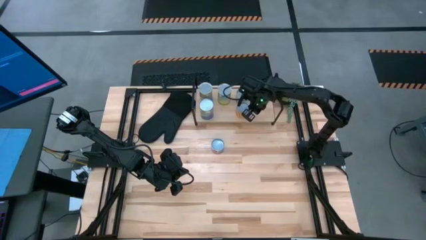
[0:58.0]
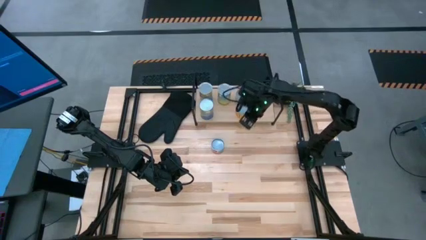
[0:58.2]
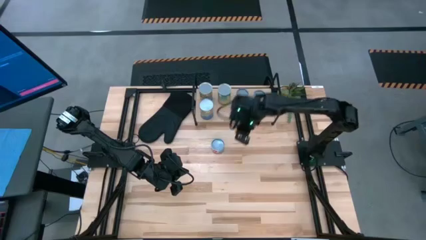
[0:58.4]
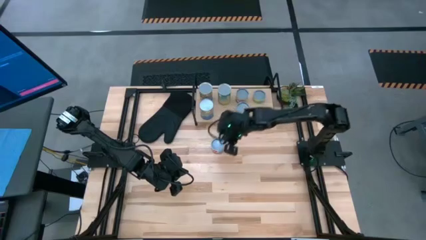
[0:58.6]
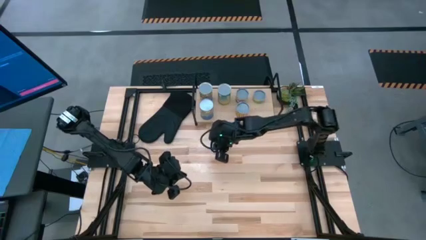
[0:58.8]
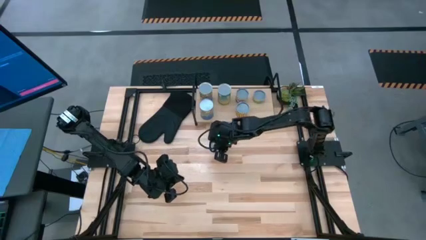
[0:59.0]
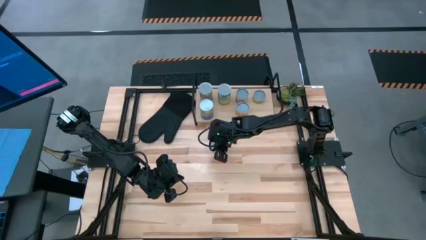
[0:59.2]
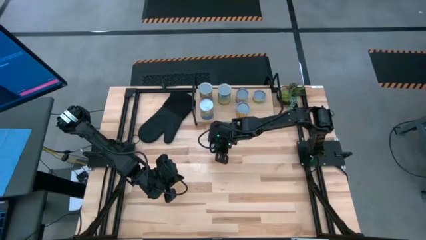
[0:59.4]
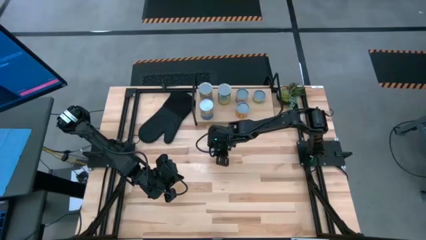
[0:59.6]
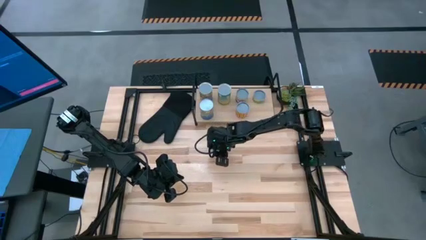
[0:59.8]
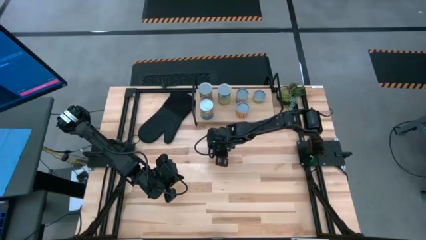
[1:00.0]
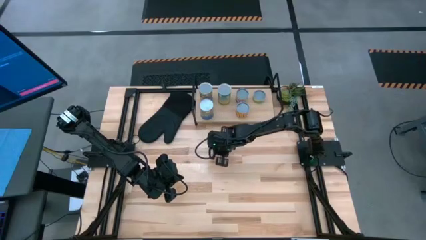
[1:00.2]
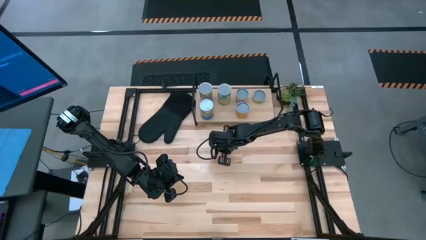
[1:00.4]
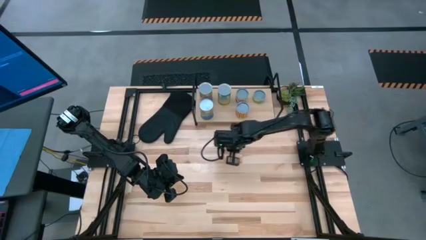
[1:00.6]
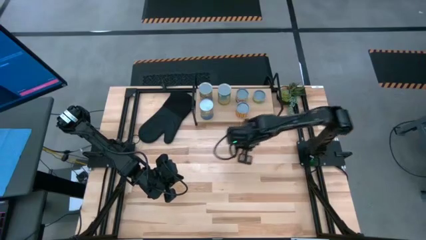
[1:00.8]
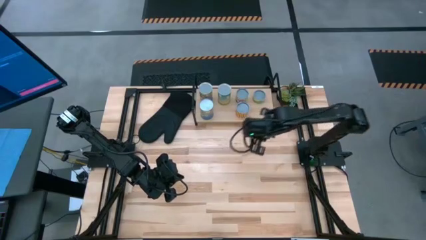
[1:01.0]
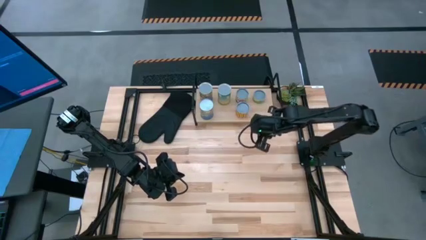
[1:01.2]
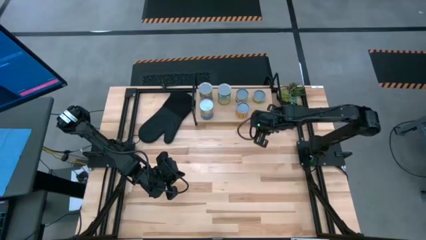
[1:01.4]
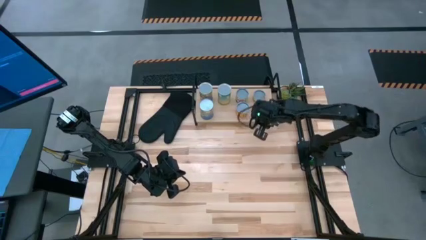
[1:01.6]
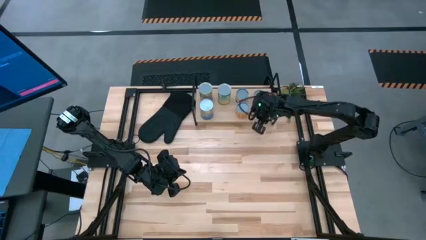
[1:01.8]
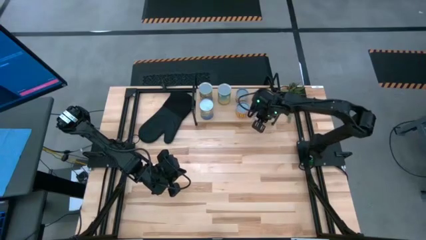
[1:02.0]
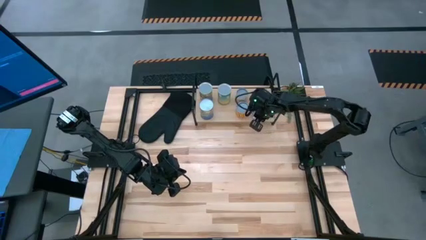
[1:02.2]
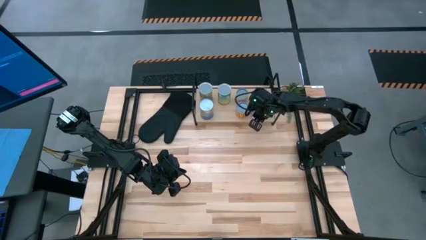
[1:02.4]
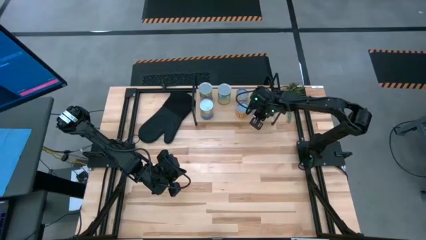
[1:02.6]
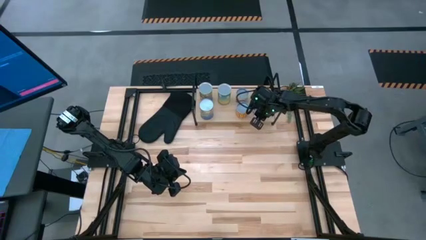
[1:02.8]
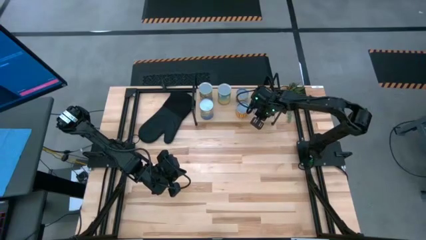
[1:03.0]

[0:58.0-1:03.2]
Task: Pick and place cans onto a shelf
Put the canned tuna on the shelf

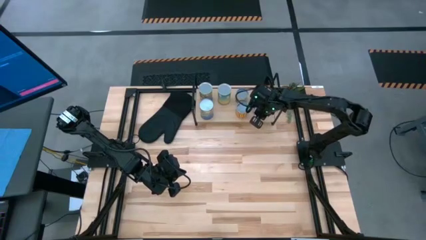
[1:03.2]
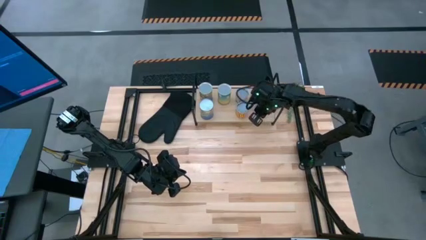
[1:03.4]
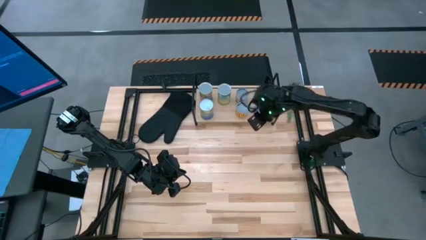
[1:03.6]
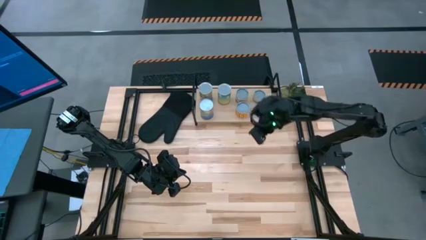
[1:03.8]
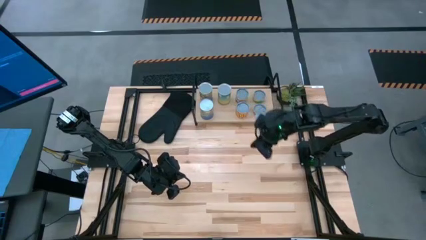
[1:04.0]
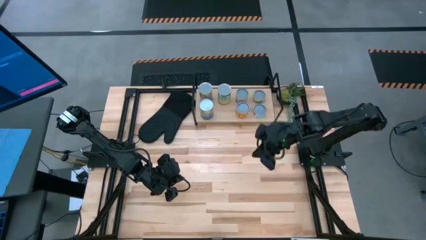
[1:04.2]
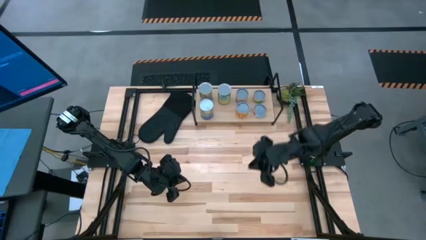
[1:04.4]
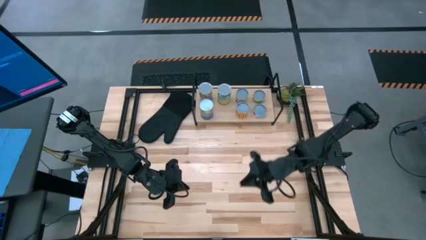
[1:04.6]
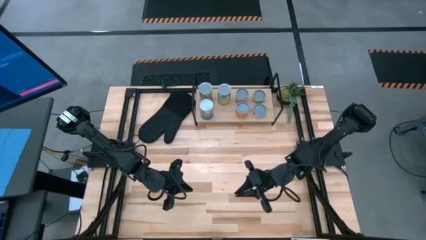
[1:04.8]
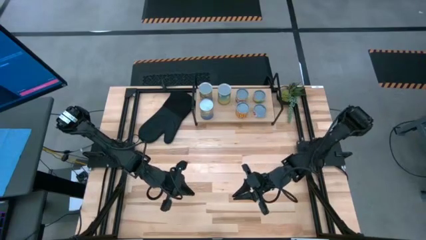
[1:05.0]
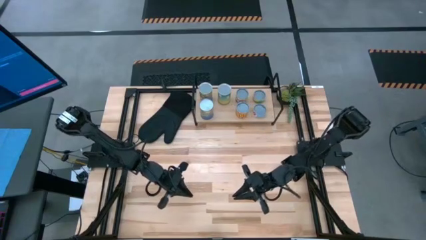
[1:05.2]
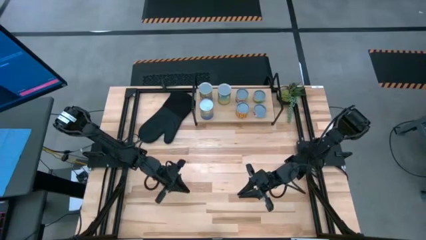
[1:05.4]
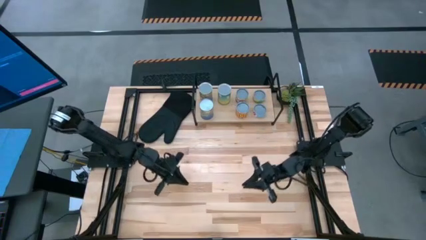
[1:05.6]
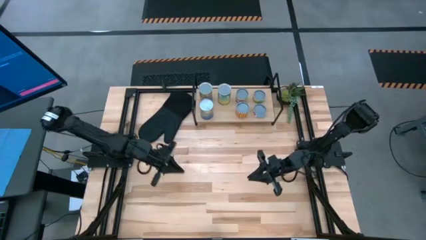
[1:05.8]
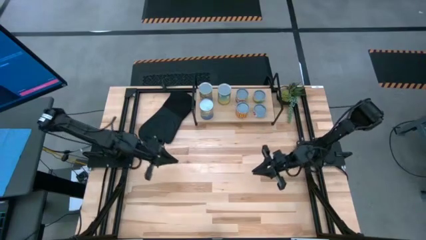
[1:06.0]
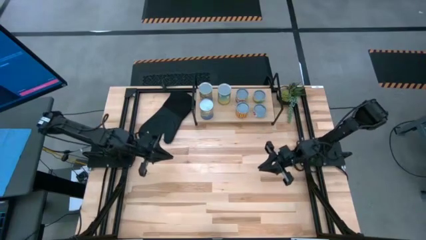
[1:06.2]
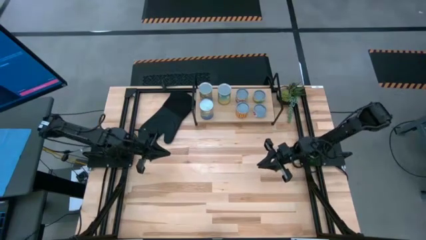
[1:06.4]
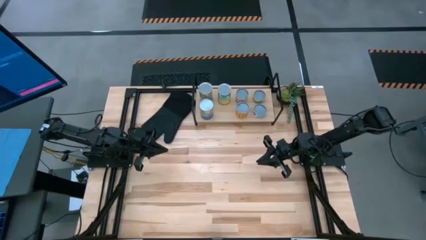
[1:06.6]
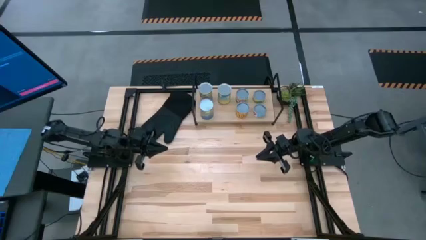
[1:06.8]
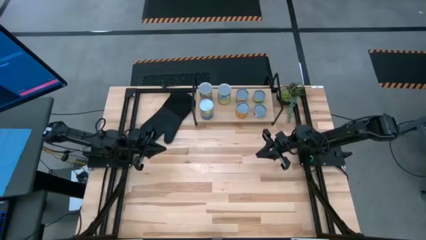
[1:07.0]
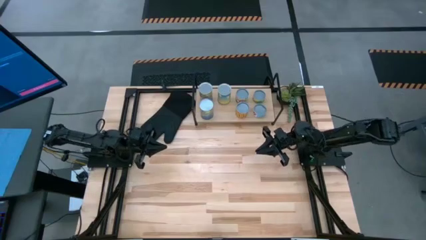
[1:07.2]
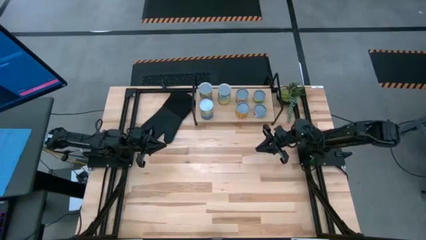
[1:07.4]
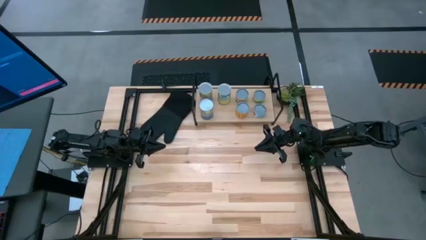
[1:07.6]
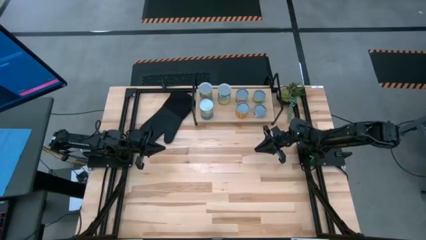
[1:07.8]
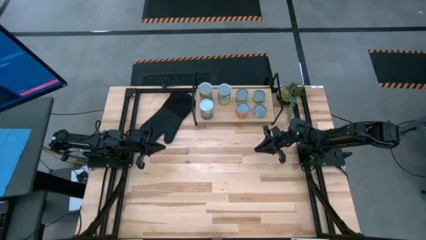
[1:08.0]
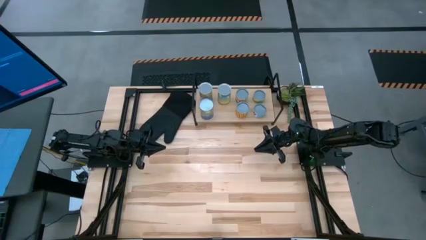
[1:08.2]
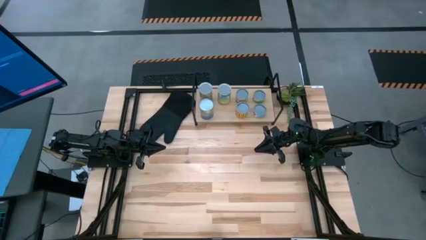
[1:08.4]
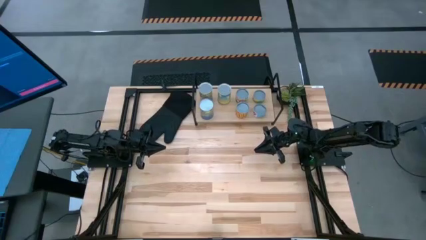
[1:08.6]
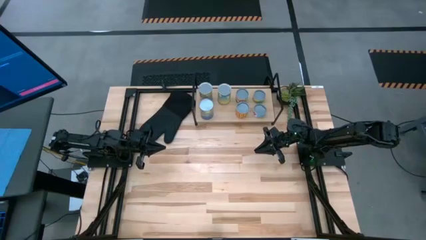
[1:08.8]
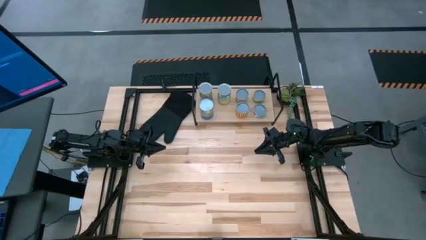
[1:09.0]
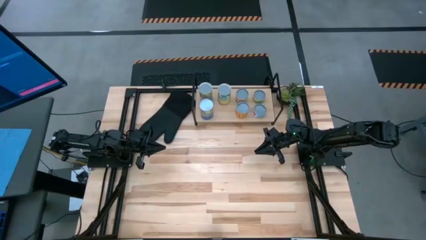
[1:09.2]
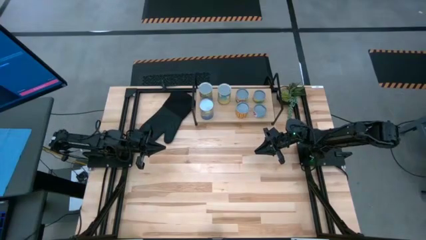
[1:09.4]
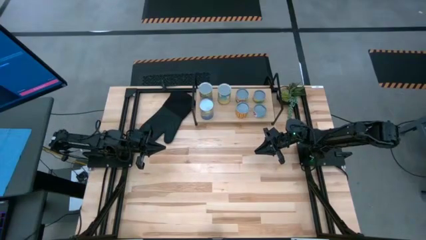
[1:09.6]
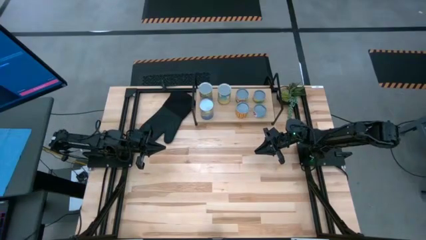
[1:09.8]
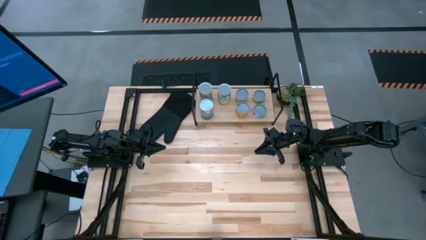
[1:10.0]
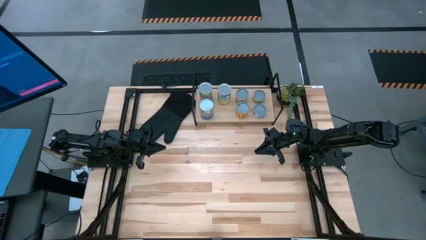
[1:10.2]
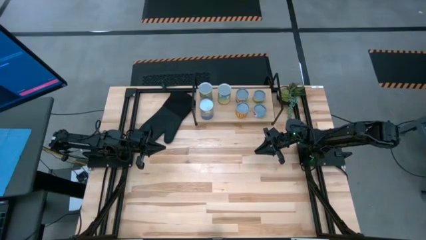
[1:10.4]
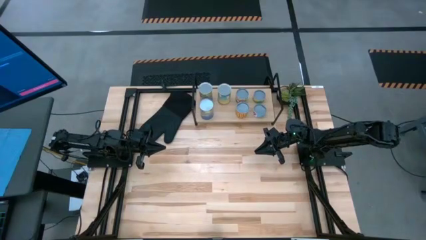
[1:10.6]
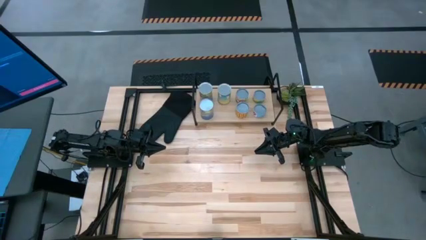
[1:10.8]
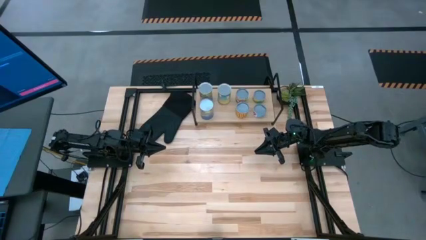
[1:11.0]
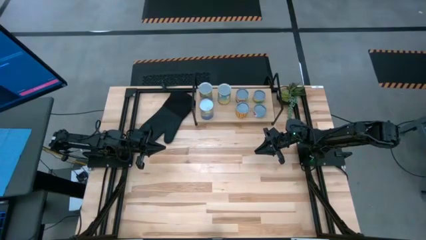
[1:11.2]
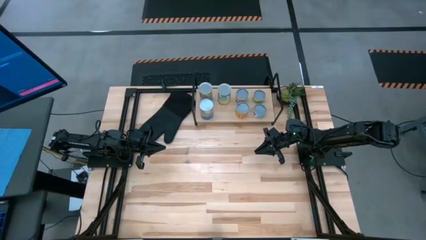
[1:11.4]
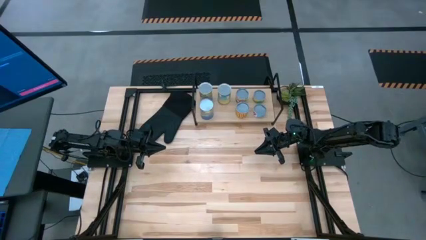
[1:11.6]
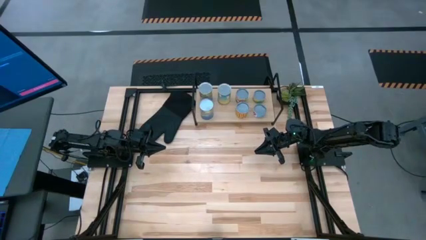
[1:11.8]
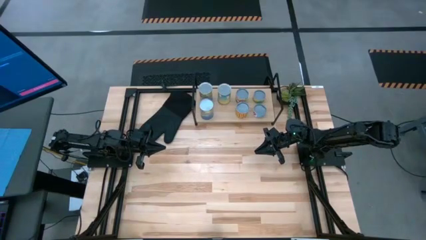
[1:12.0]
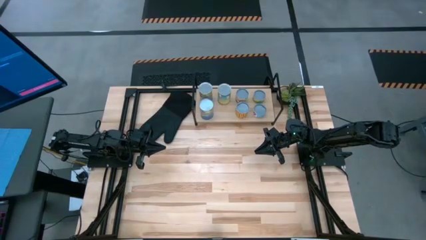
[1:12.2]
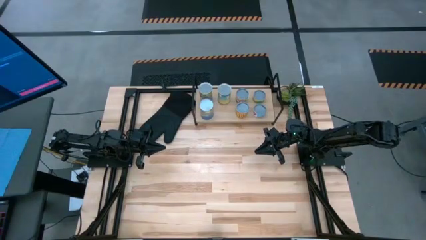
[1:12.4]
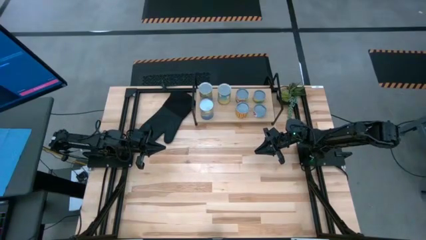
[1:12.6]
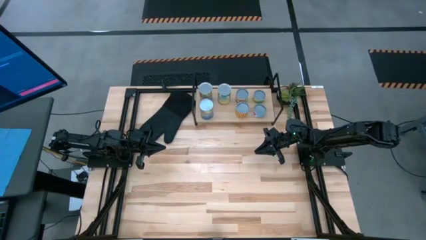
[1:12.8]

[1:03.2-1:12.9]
Return to Home Position

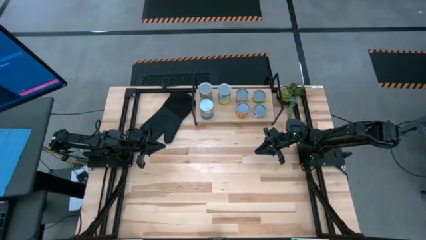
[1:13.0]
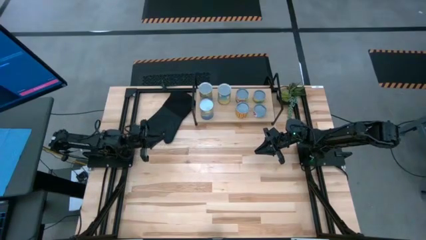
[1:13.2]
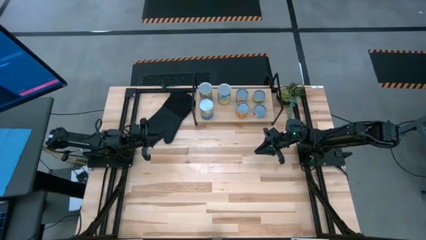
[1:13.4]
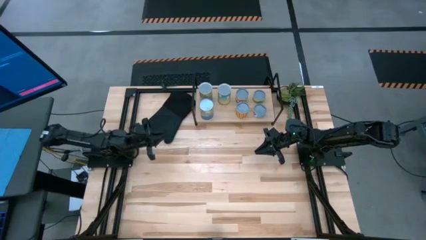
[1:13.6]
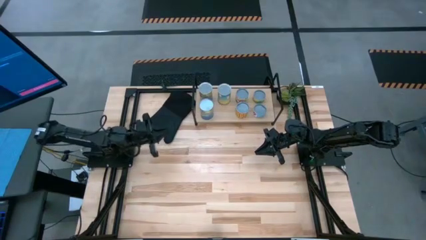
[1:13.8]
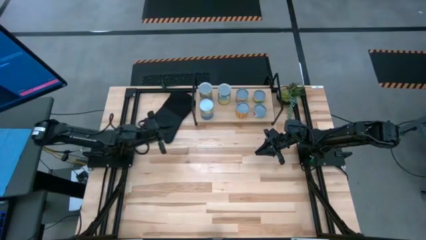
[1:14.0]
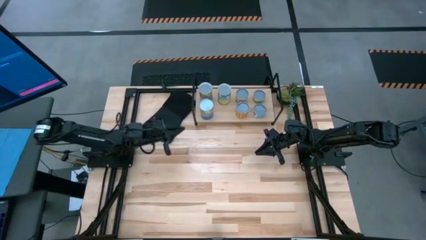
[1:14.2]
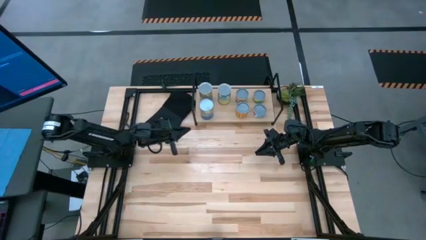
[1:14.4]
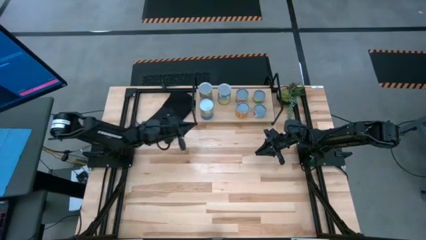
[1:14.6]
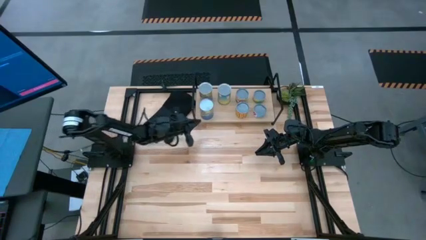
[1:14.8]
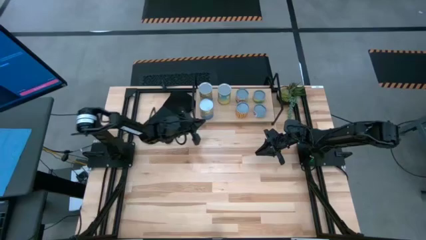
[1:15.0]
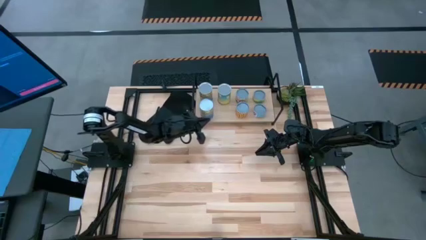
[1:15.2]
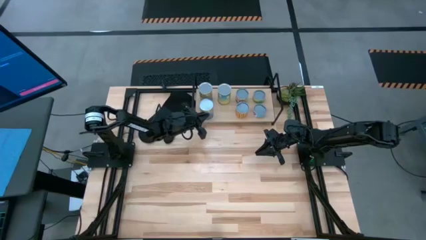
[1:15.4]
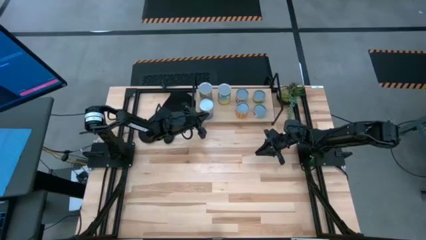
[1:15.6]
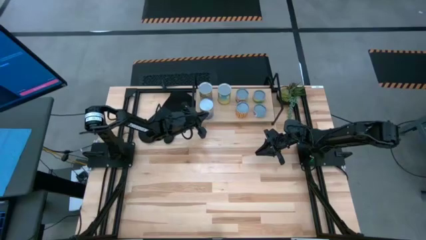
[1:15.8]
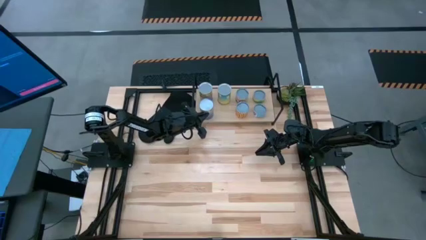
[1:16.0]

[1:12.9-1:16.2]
Adjust the large canned peas on the shelf
